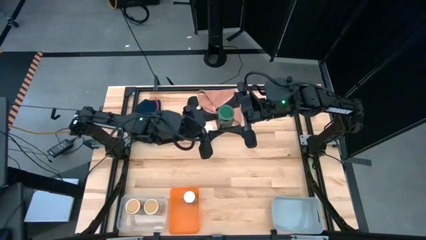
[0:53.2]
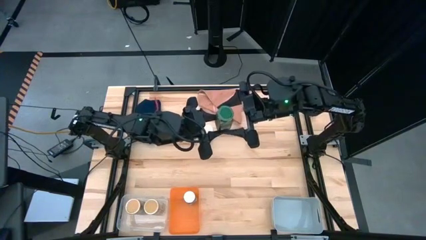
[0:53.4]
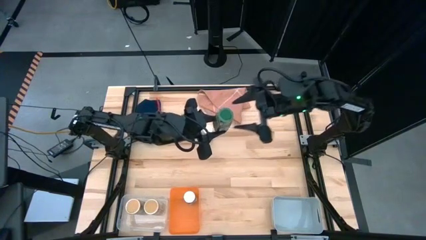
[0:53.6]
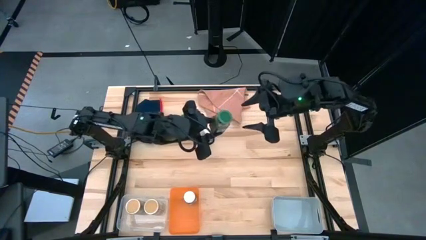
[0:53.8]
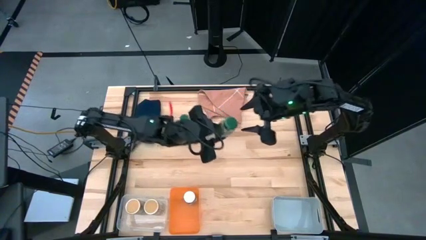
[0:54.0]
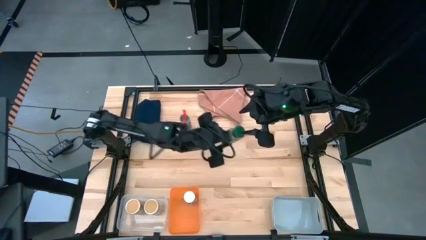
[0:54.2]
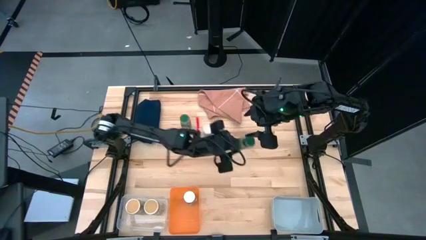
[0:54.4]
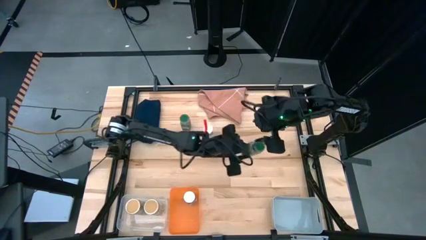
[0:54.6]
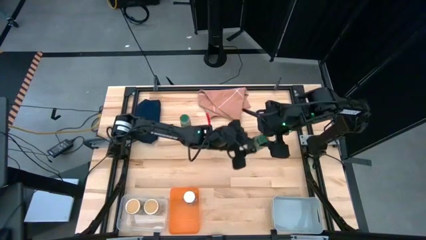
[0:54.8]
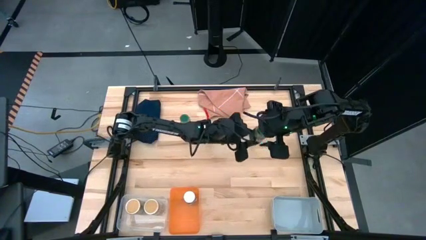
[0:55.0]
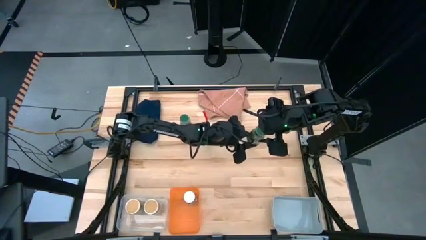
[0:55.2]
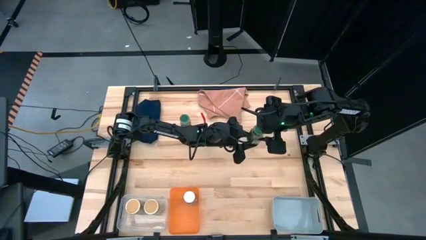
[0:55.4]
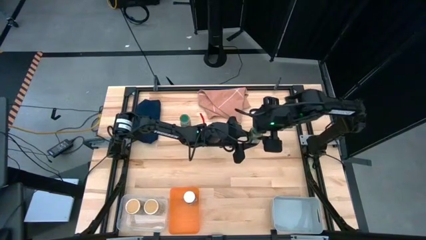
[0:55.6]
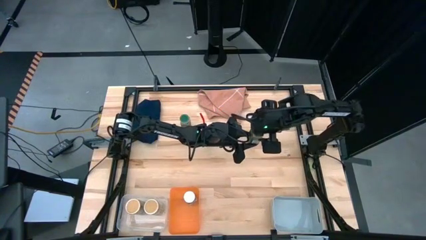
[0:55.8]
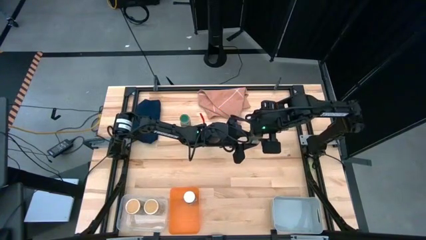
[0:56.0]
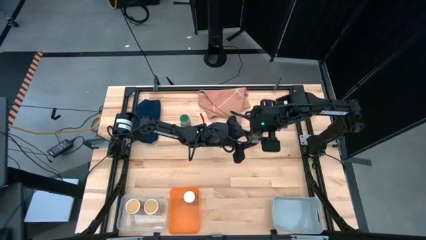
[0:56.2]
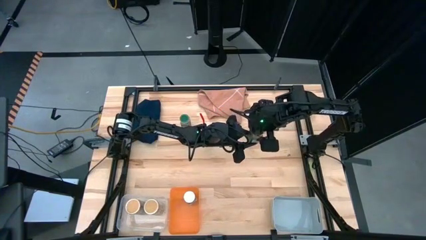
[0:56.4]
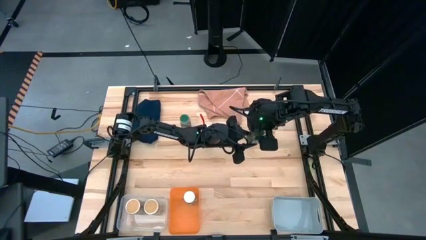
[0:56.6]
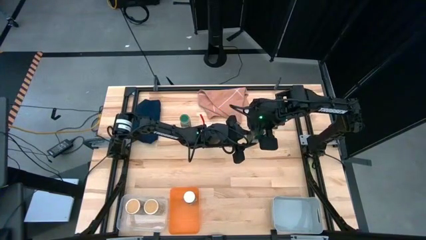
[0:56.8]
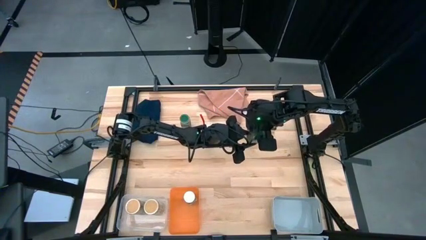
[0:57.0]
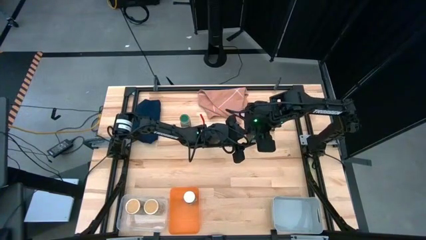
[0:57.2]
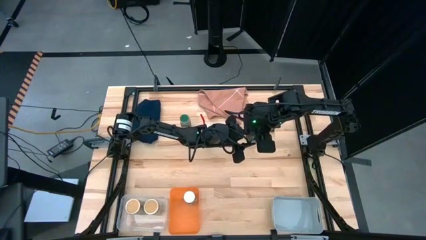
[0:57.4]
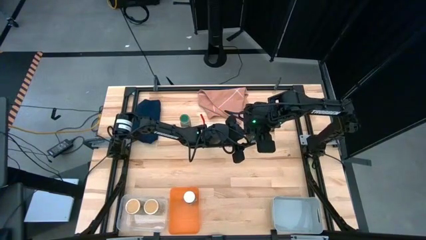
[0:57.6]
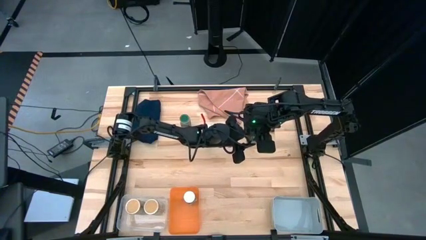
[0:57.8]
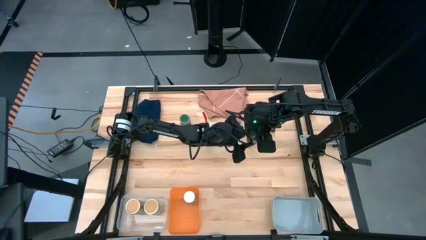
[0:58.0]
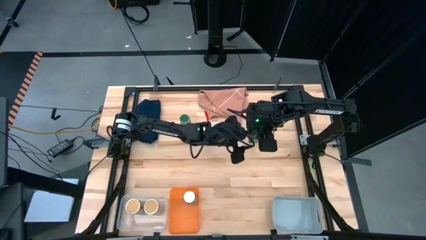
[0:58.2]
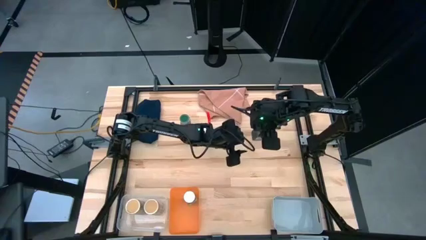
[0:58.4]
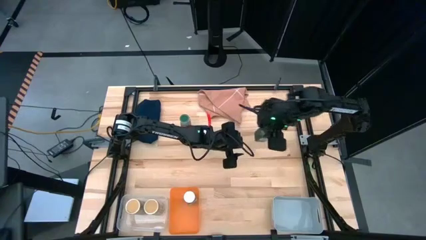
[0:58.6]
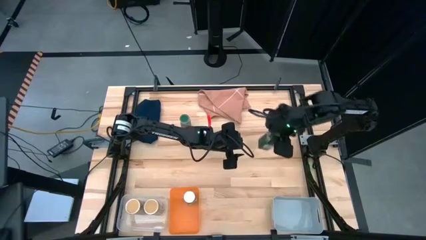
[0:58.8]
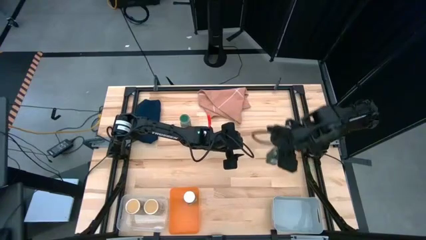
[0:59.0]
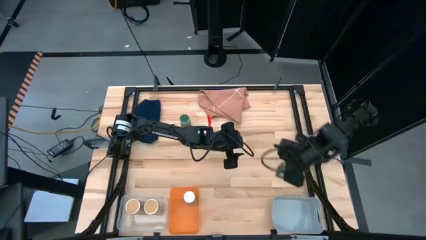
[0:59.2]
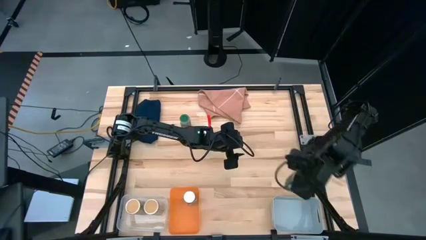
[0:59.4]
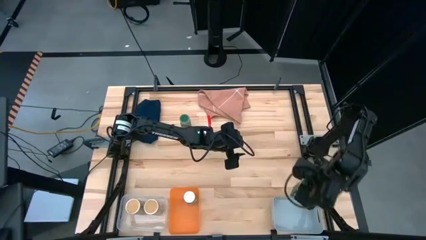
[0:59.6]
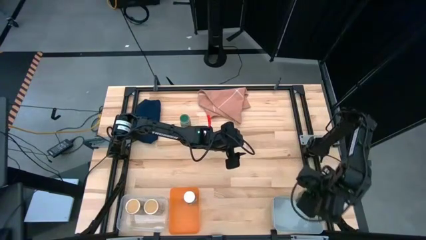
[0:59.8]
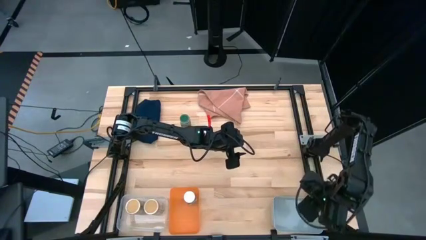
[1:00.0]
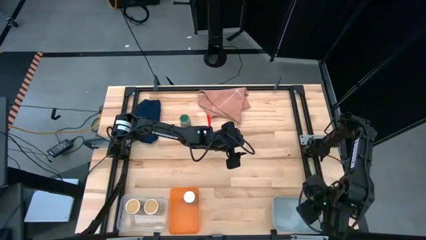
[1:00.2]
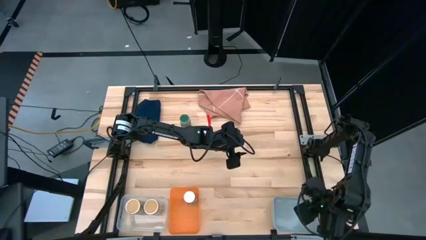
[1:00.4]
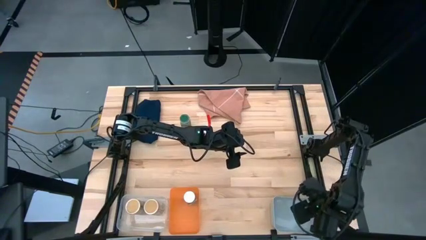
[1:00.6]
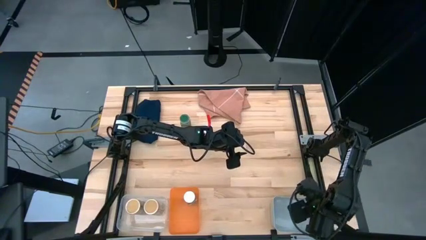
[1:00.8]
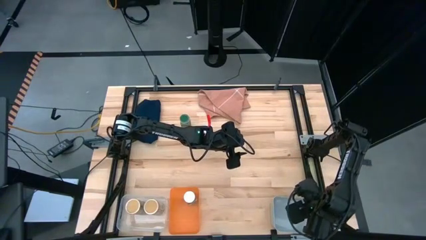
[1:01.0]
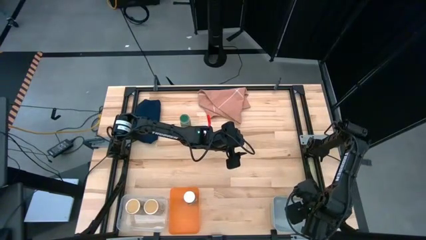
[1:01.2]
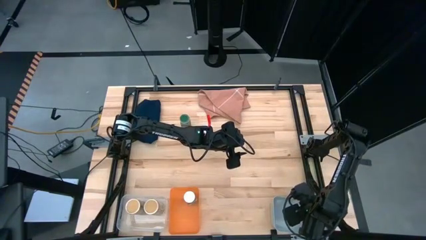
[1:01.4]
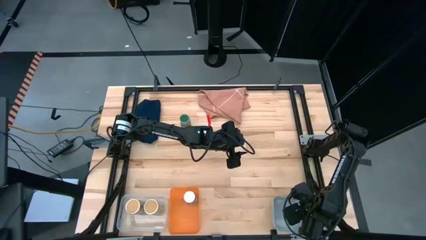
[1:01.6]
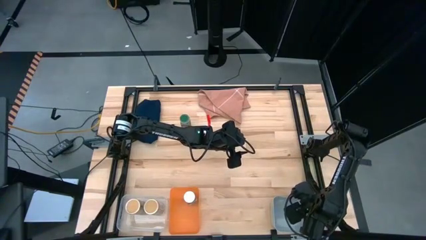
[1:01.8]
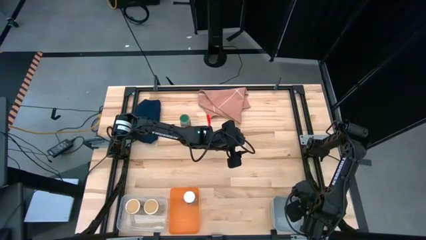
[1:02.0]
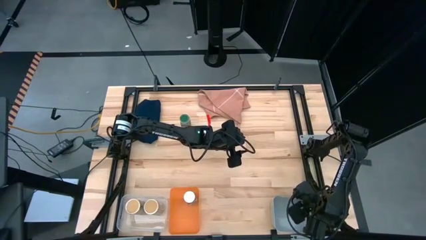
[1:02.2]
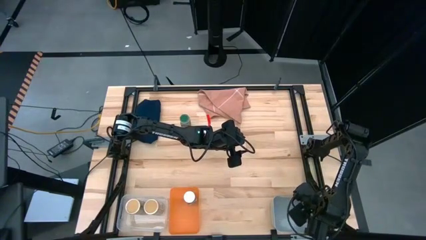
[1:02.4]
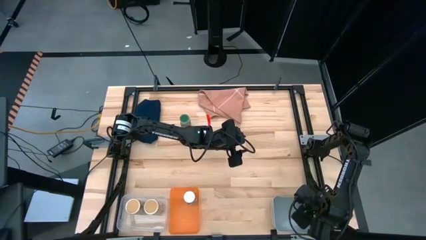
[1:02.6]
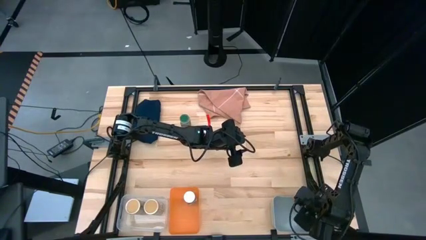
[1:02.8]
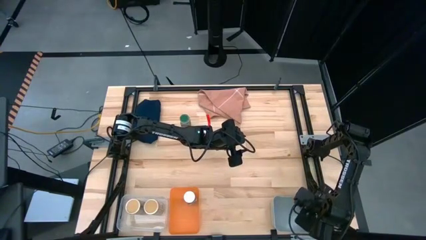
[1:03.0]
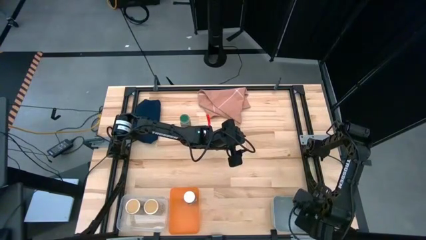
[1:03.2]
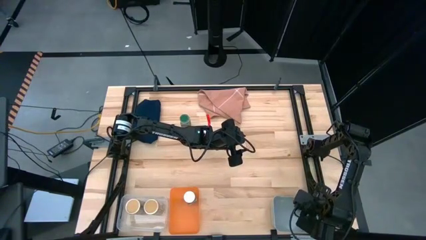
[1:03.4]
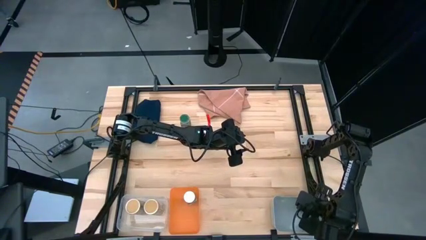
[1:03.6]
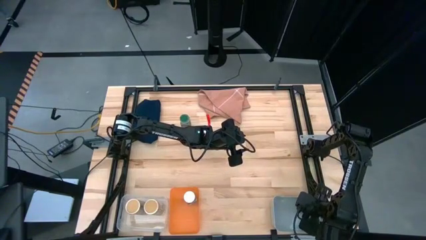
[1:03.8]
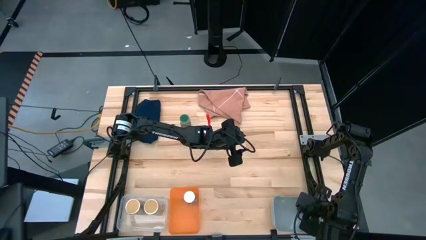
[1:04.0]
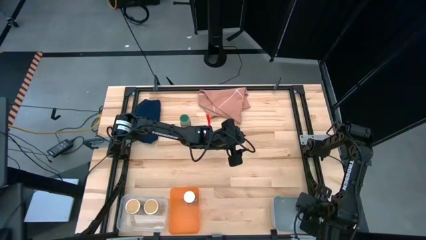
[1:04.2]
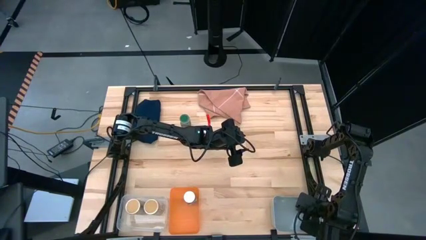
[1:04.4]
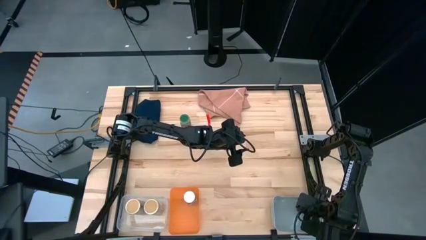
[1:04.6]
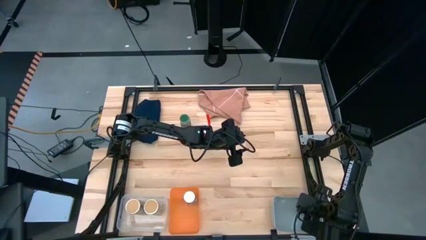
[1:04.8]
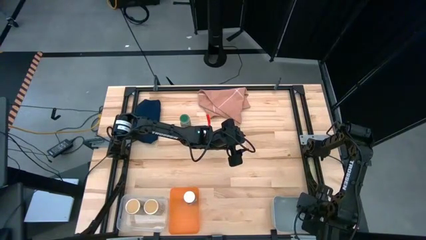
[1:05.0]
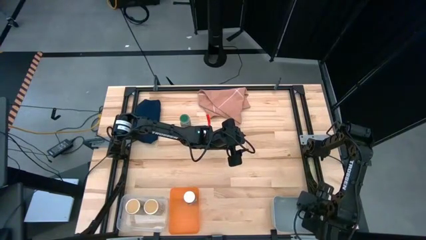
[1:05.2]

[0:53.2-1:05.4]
Task: Sort spices by type
Put the bottom green seasoning bottle into the gray bin
